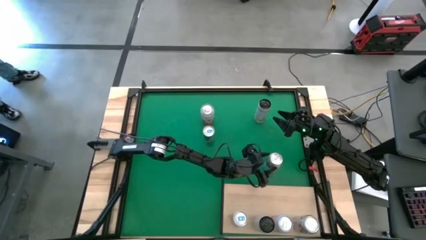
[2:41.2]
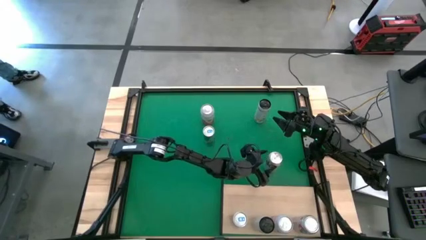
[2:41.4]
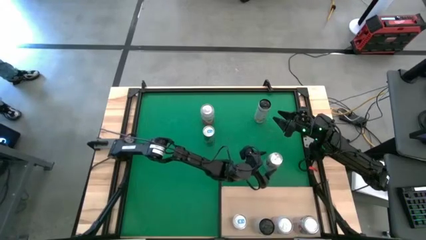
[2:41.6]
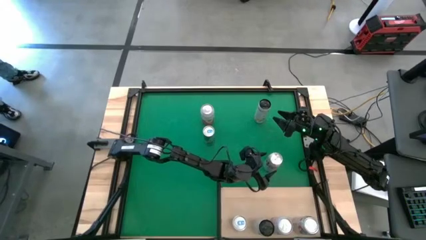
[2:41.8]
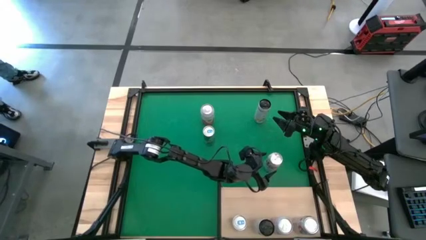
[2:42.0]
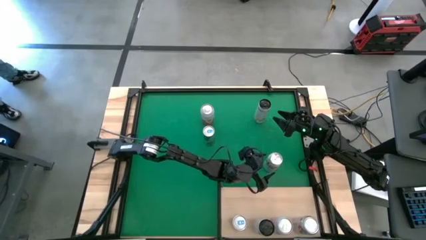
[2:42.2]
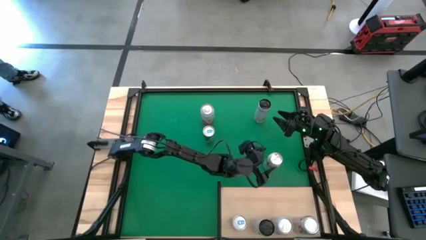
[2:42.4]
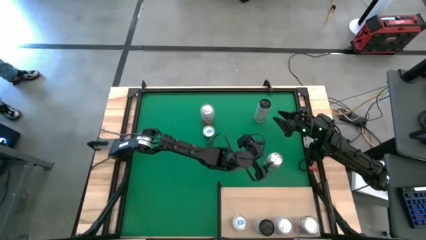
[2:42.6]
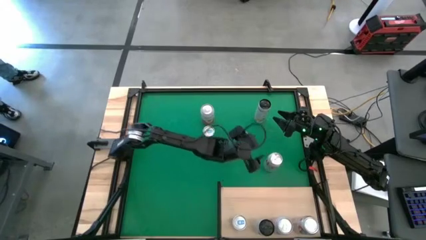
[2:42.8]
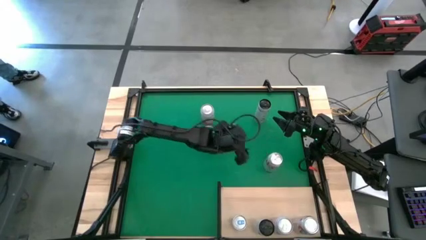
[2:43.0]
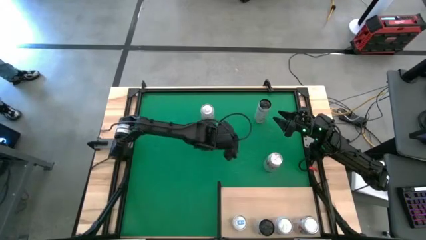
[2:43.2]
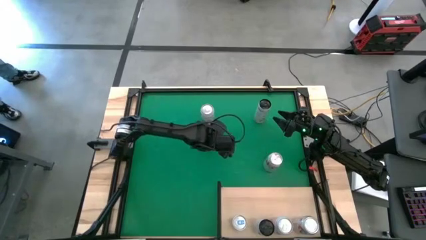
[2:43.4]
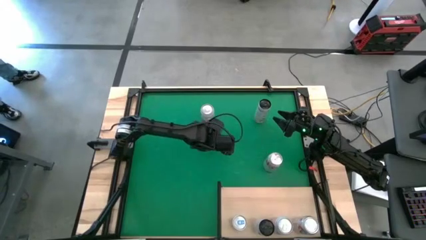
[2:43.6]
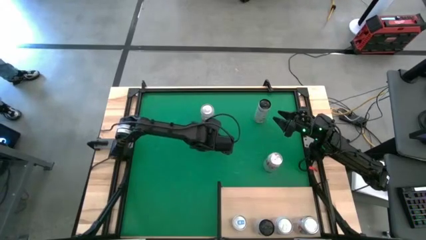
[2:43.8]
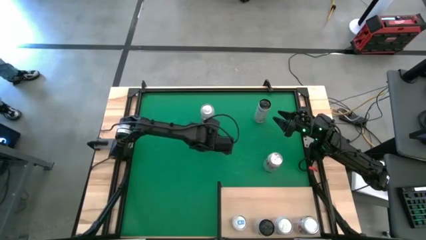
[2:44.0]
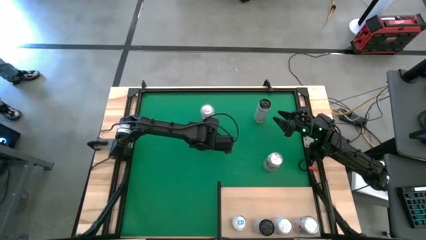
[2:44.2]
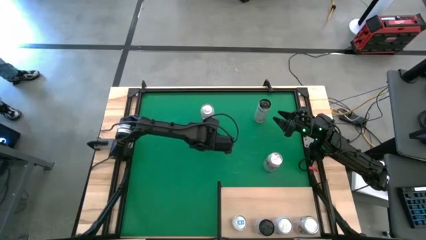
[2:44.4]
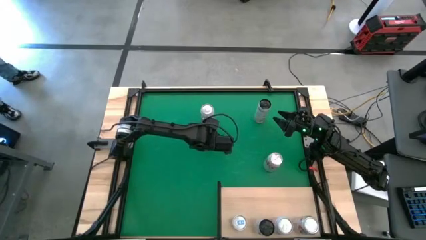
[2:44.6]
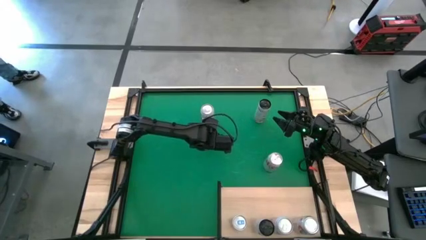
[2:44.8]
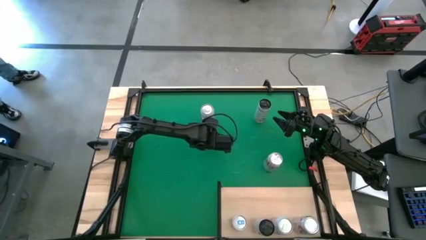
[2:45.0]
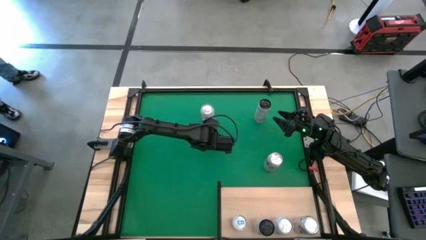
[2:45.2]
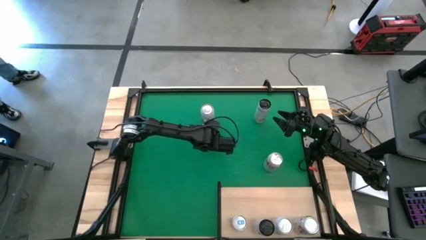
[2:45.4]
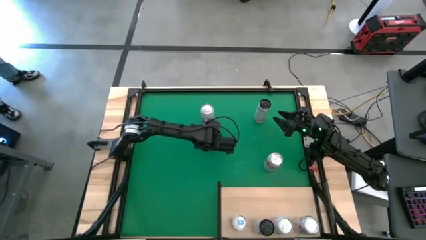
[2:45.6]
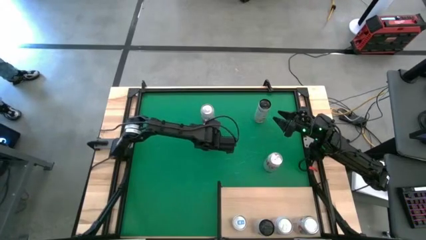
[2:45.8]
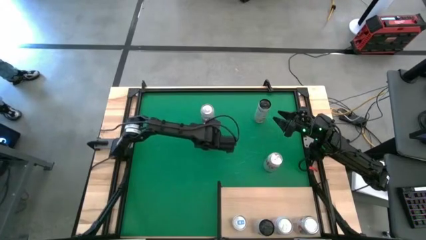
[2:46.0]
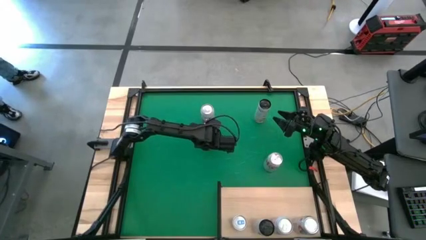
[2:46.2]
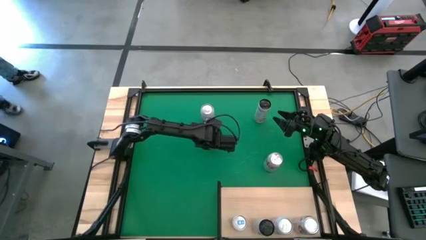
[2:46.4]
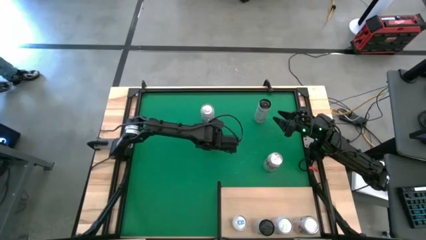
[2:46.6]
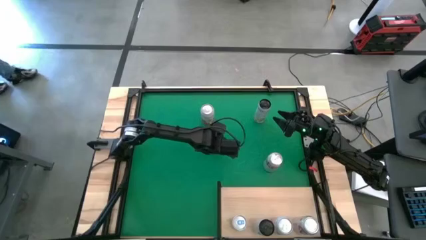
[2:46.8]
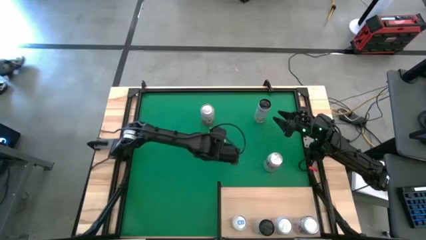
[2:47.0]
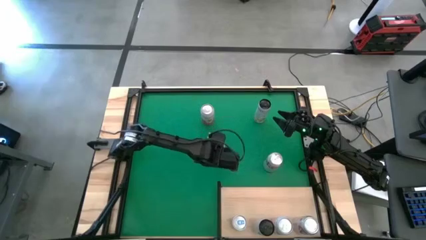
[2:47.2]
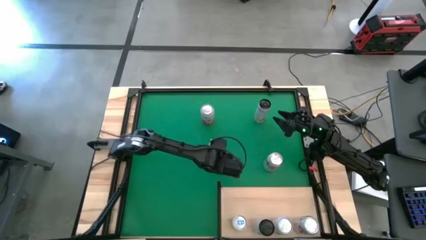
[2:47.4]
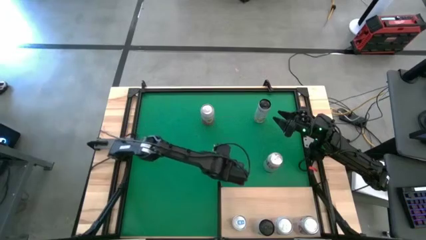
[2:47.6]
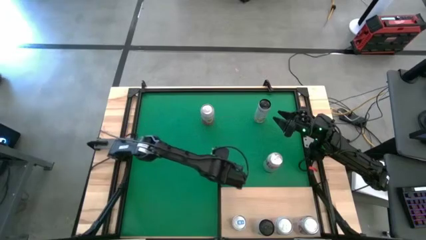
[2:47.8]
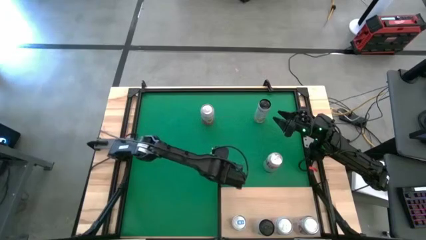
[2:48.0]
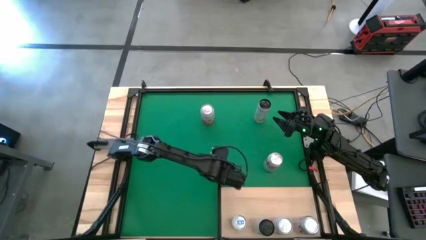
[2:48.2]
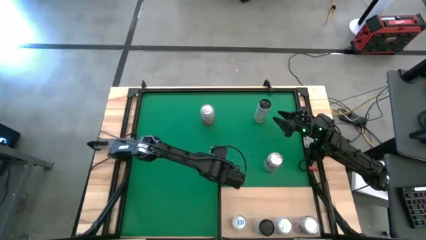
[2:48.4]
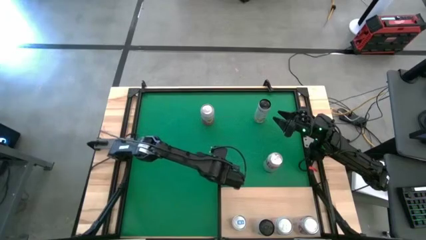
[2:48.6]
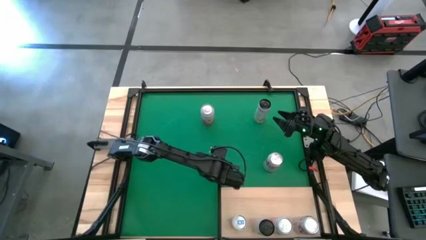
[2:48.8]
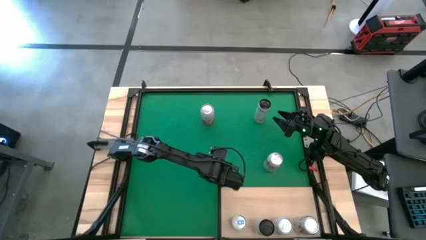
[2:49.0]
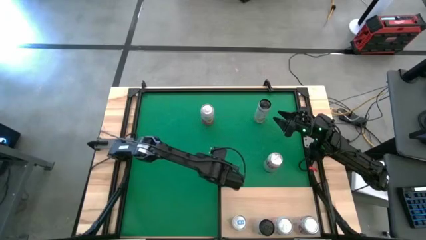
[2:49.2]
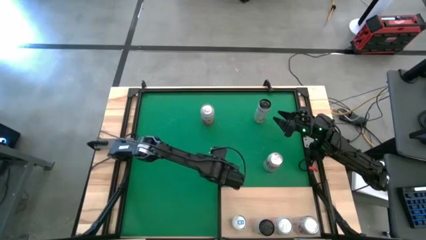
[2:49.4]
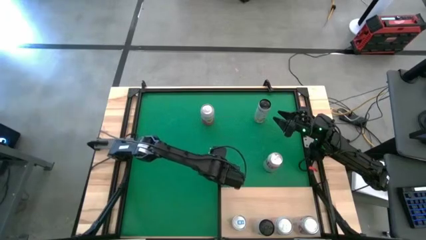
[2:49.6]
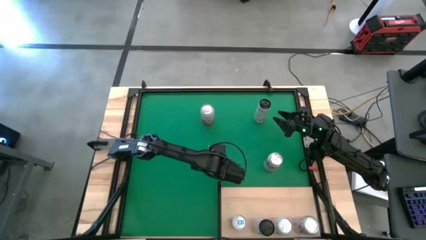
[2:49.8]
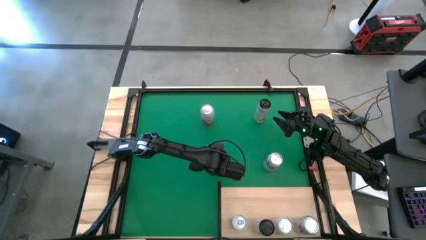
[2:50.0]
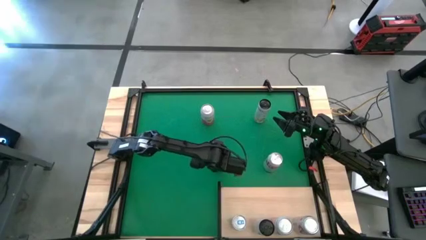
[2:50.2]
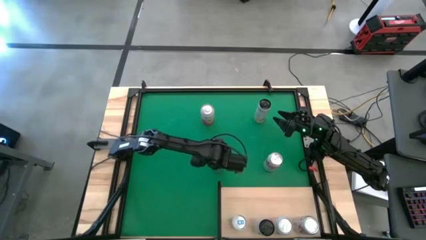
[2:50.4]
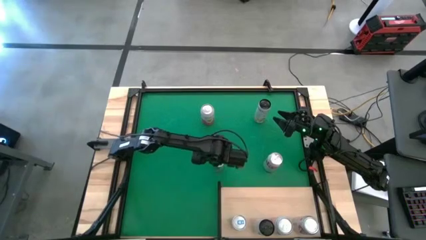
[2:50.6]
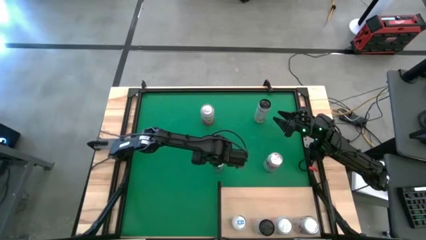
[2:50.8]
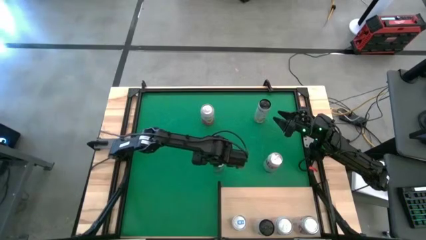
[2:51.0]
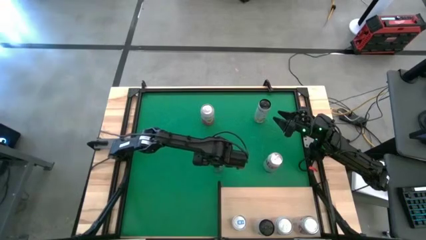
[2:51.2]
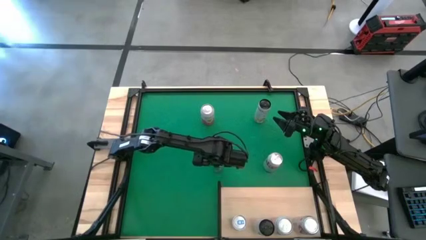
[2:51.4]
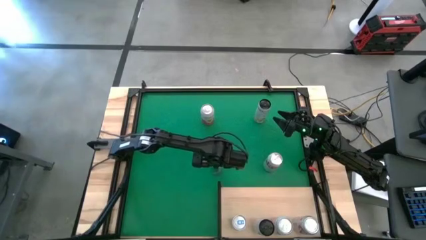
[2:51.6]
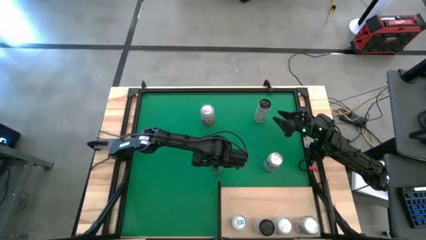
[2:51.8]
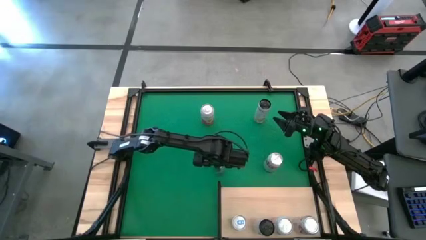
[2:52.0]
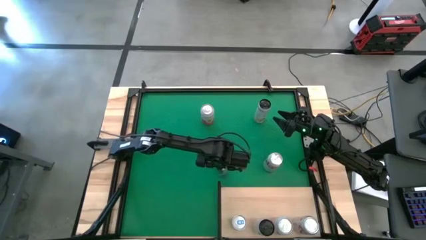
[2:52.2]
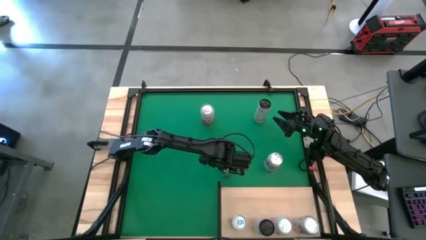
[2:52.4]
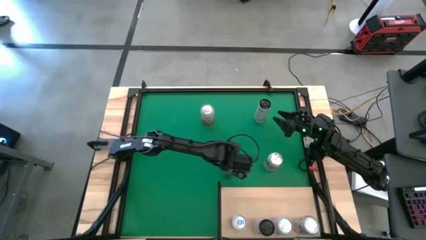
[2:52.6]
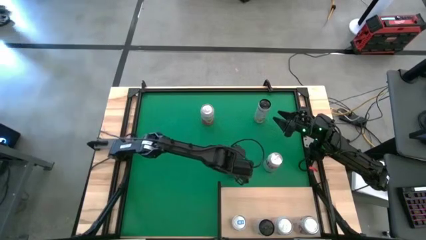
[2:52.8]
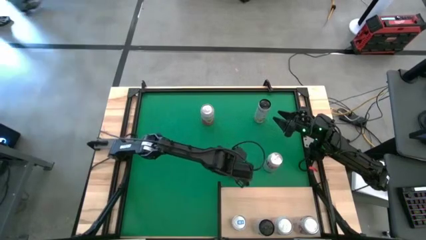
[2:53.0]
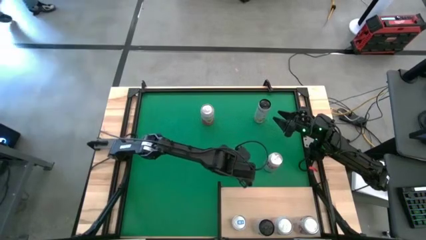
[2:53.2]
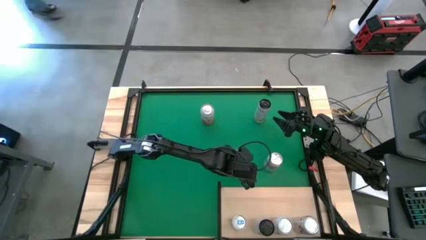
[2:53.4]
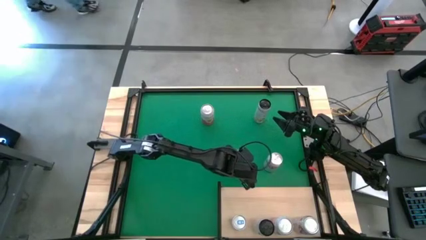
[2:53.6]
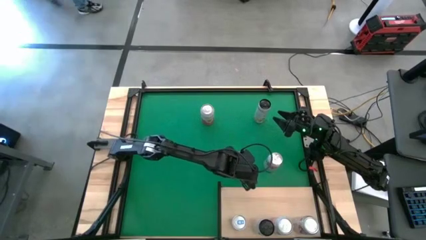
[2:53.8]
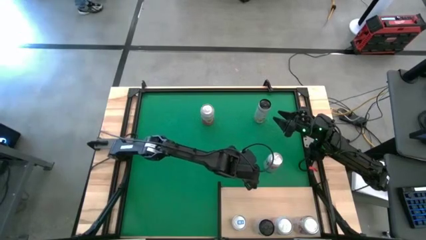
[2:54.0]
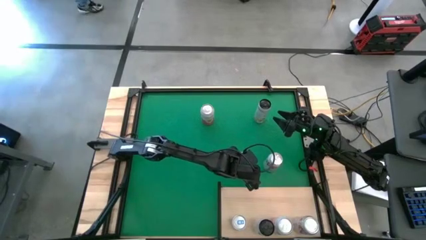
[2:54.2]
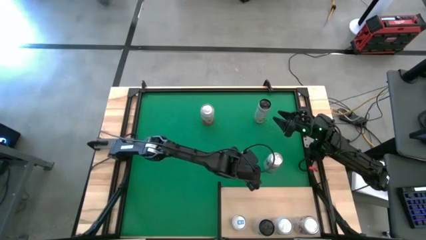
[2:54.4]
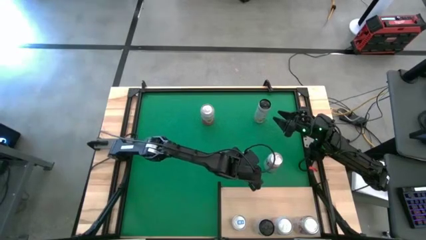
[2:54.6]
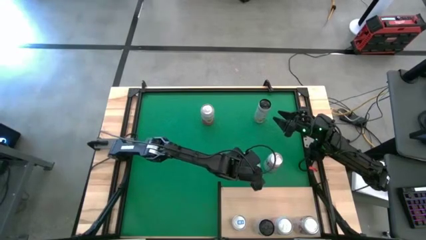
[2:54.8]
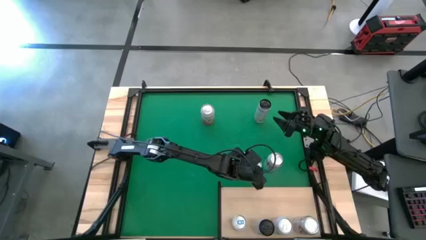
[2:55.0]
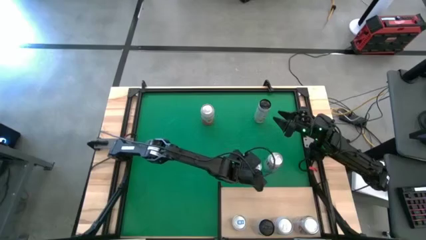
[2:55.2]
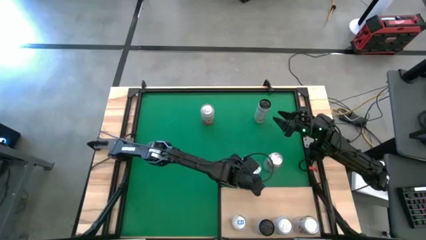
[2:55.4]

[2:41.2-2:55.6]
Task: Place canned beverage on shelf
Move the blue soda can near the shelf

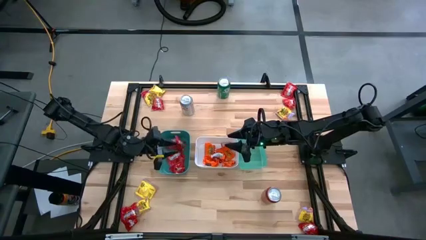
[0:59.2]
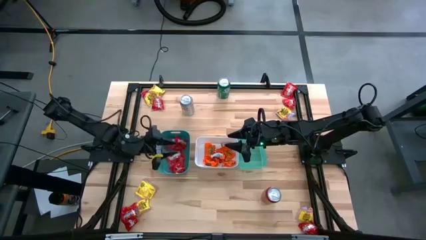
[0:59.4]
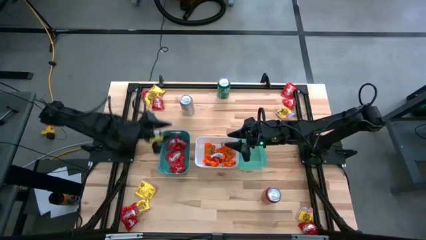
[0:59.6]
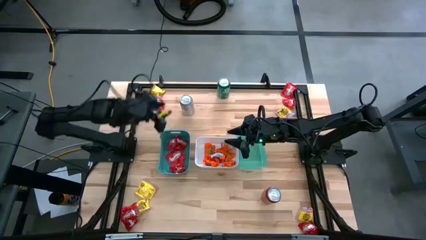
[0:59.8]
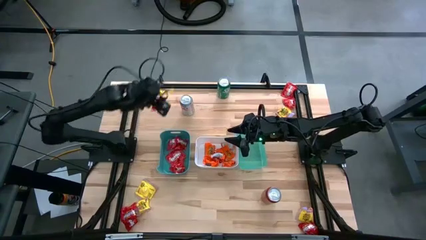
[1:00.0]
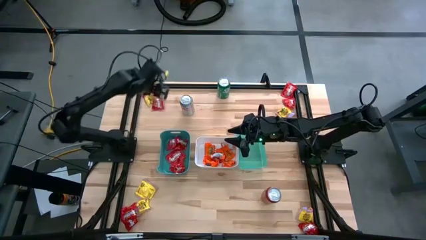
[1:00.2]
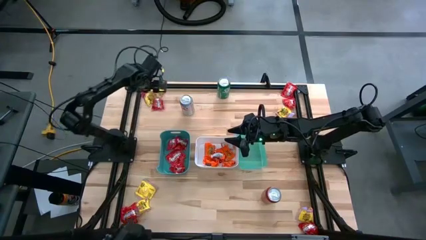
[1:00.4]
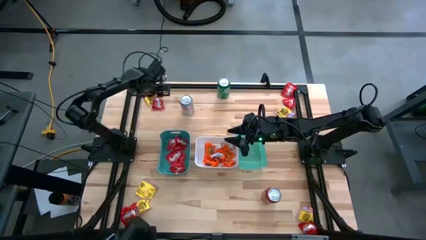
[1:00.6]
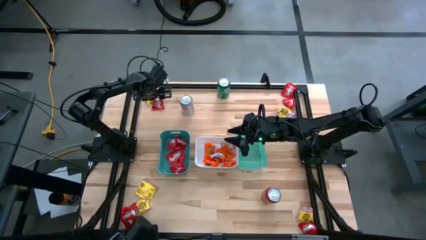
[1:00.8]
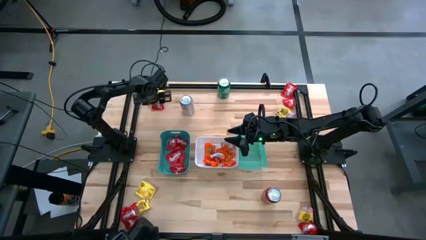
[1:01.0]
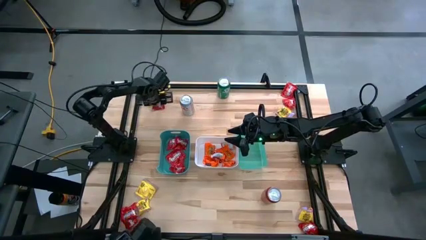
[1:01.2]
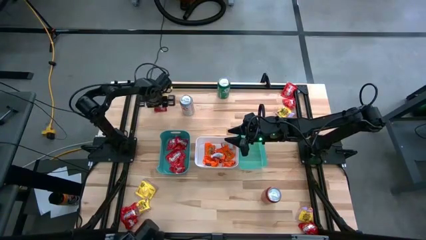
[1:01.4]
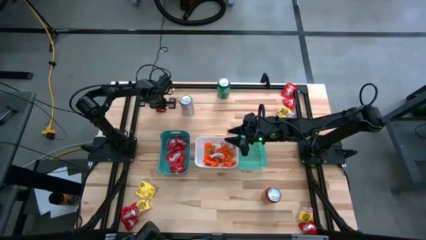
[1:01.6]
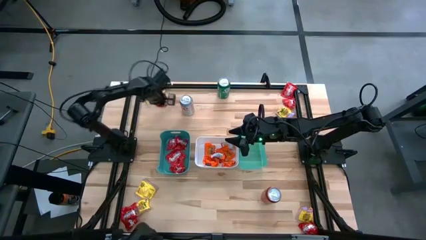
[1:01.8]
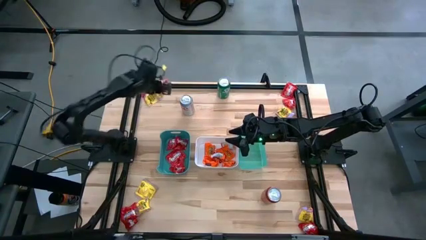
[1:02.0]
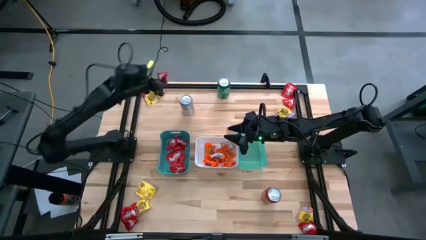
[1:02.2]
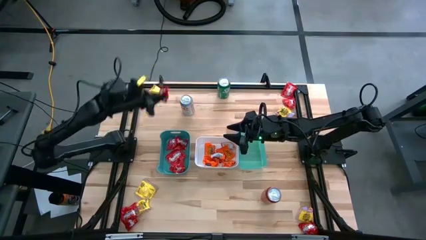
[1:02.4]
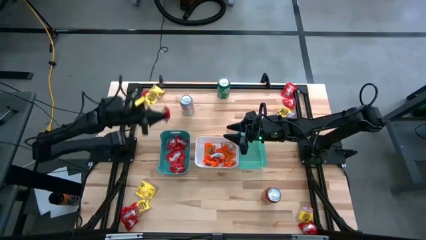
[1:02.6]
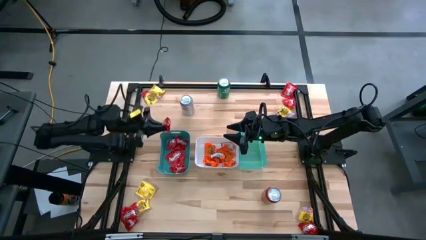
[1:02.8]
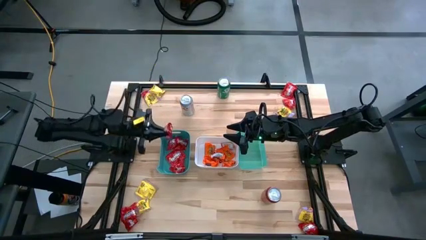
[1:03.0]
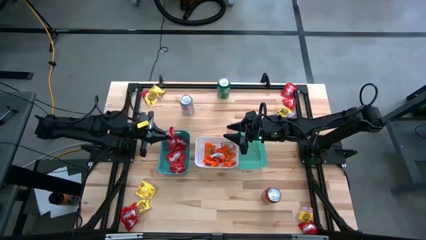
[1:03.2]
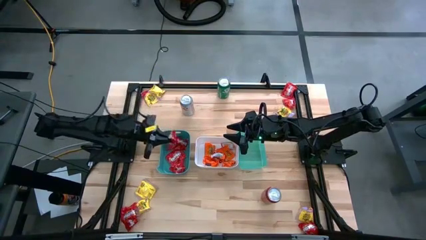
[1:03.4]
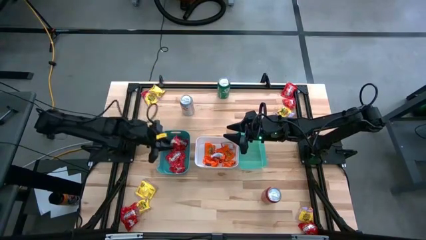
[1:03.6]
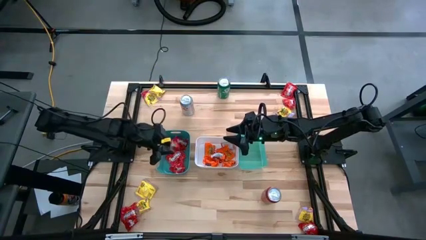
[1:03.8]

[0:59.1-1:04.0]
Task: Sort candy
Put the red candy into the green bin
